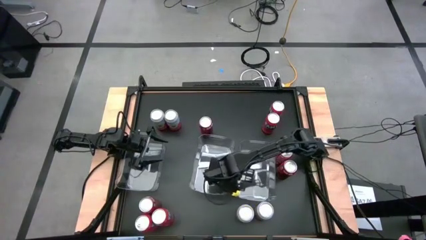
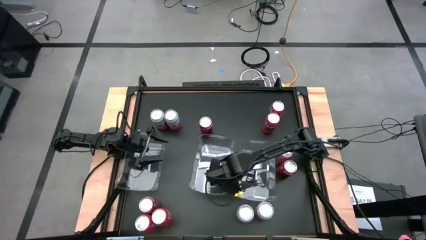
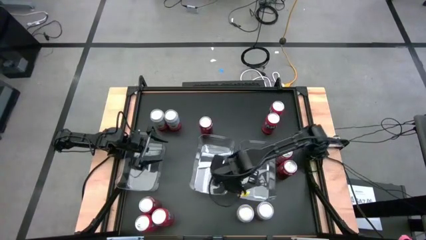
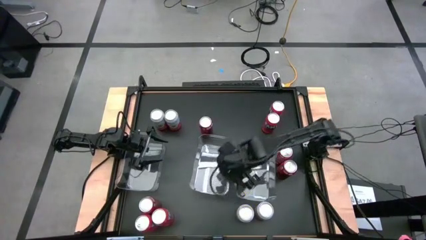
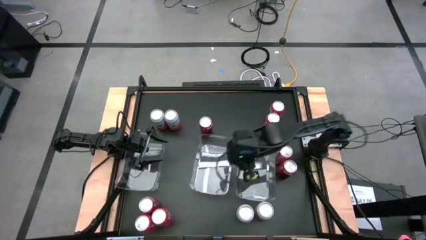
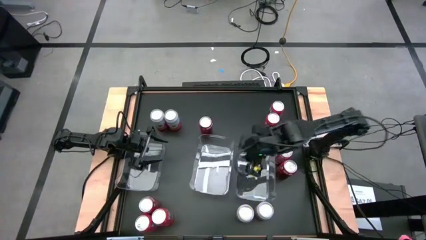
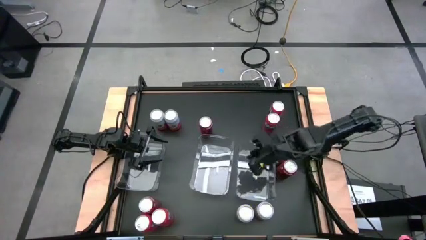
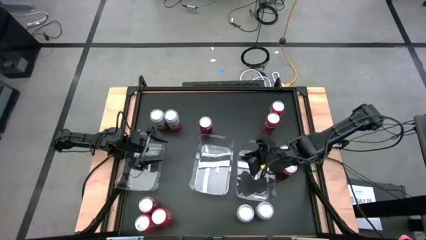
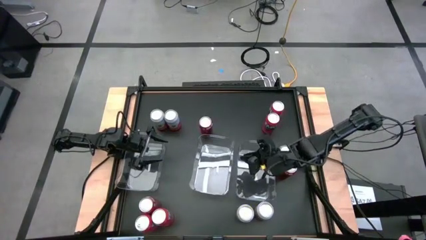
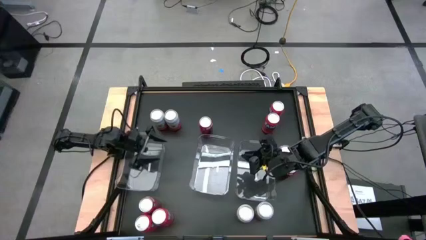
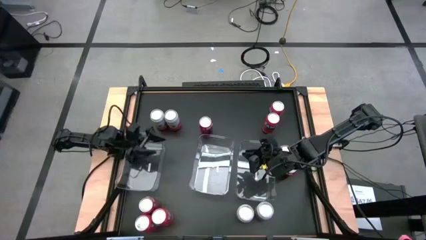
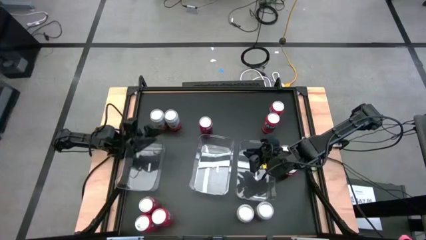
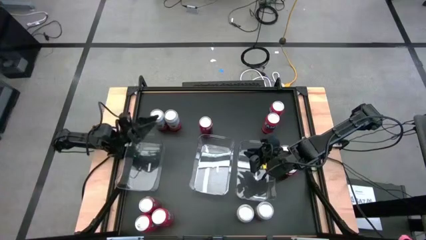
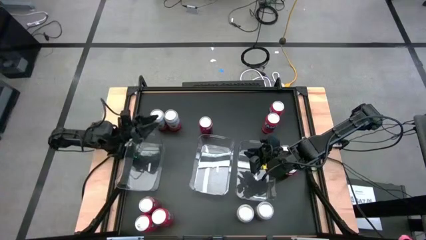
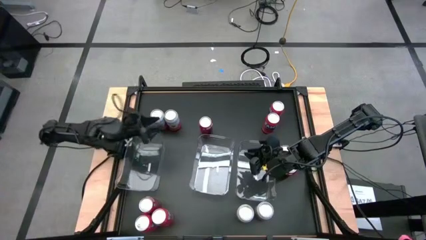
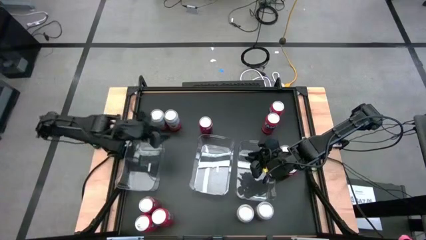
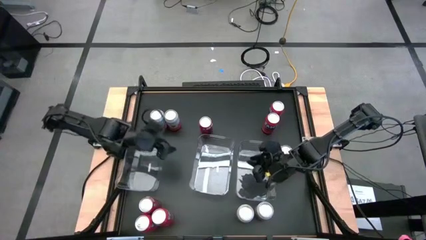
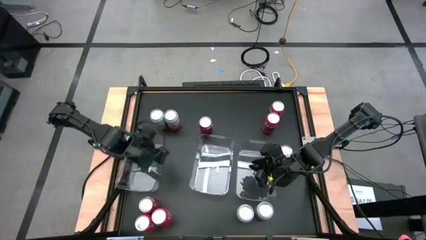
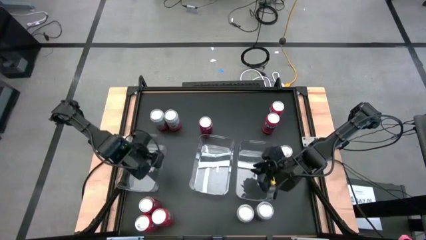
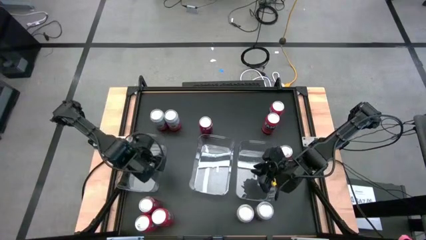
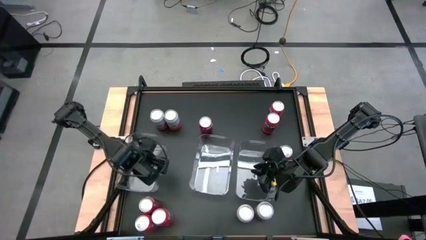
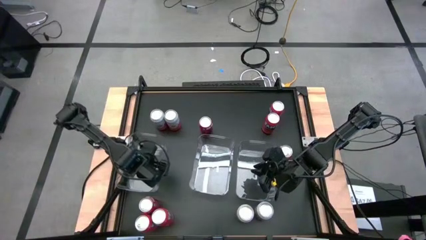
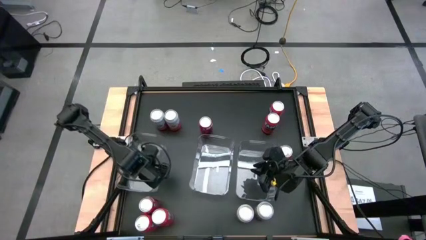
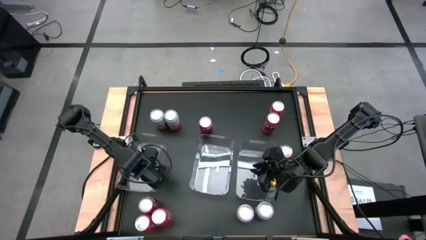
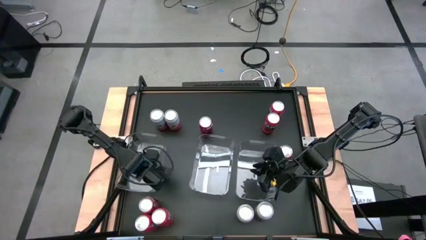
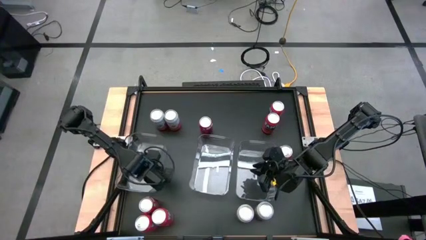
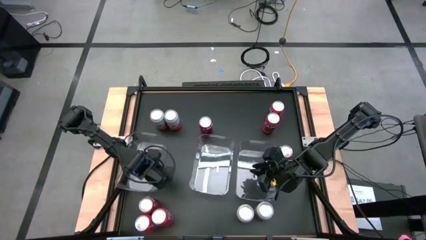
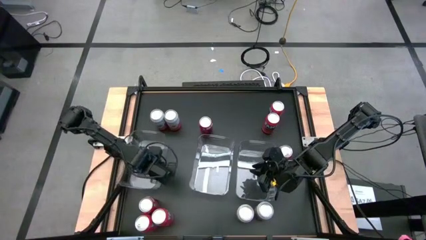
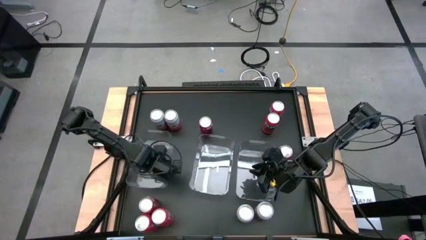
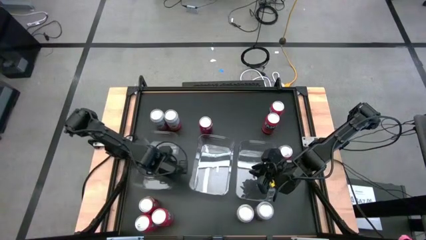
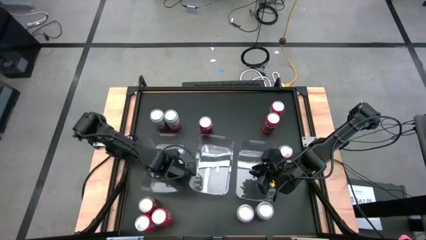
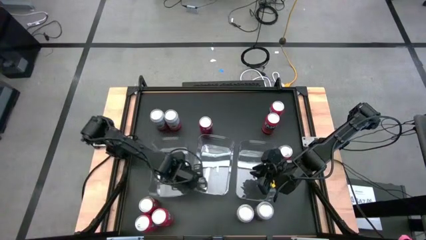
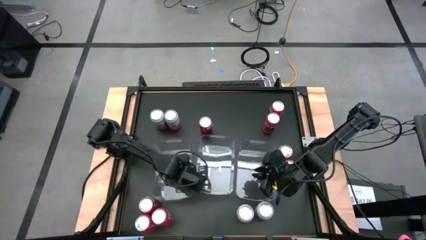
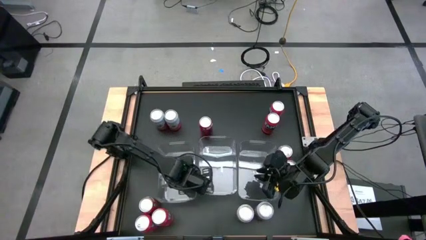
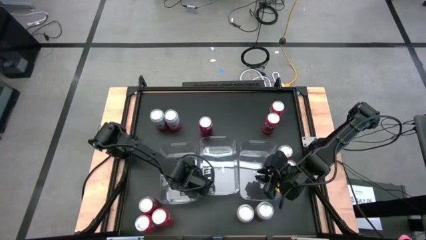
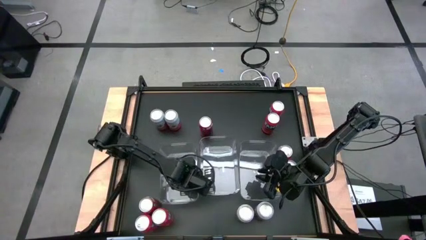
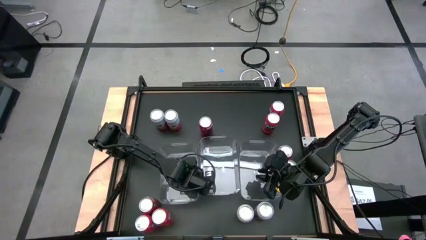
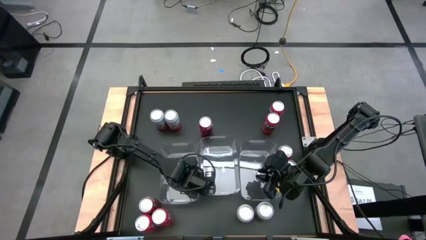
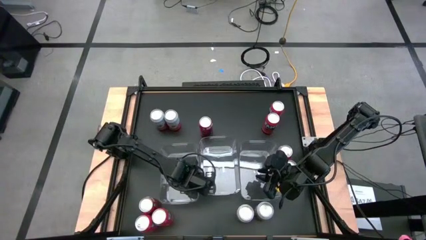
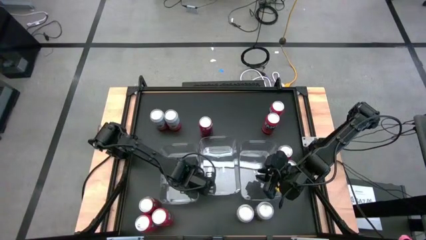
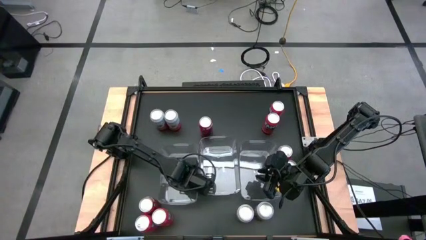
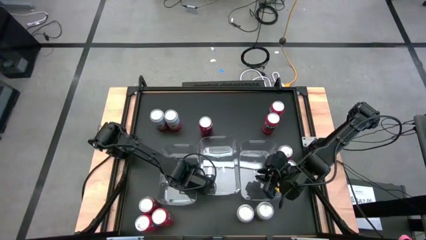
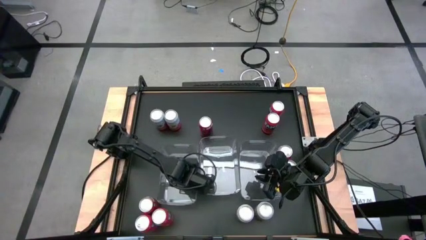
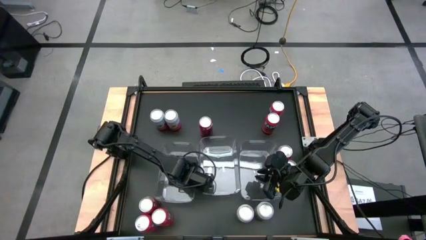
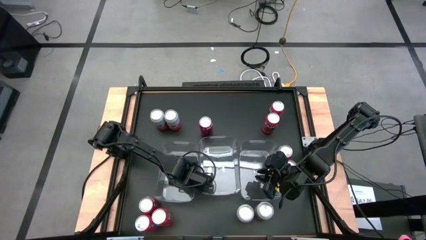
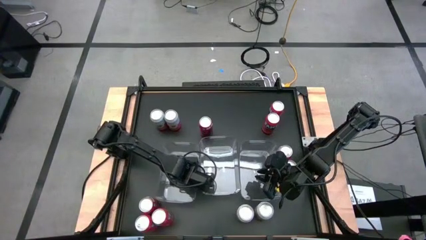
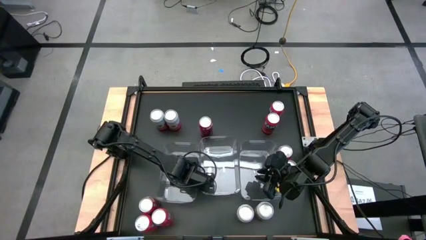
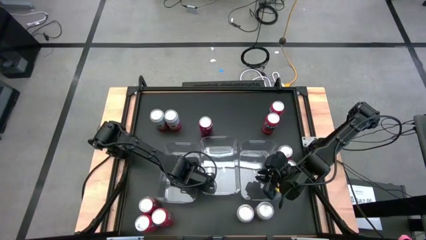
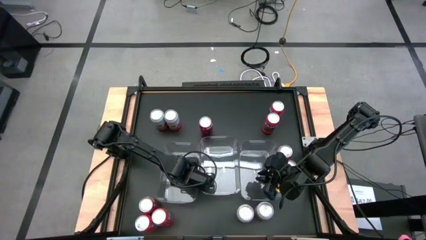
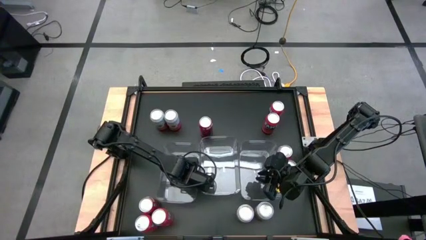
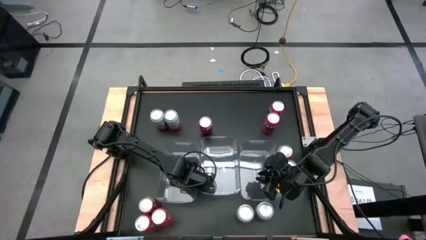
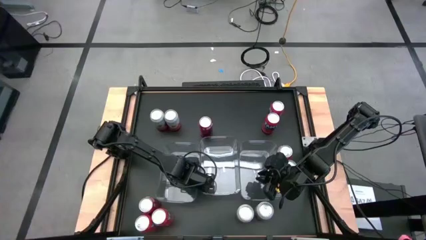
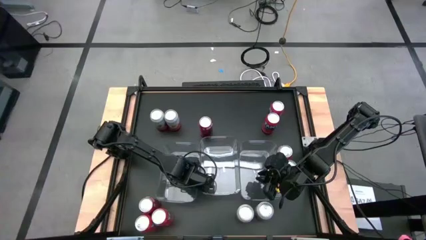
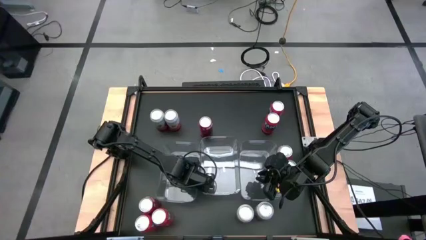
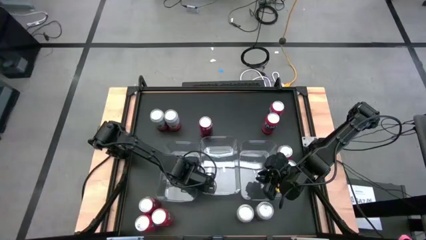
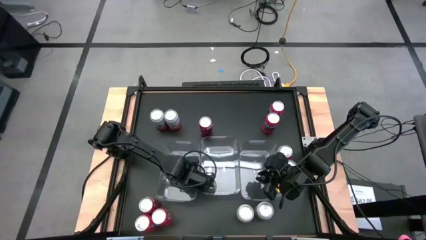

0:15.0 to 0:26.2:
Task: Sort soda cans
Adjust the left transparent bin

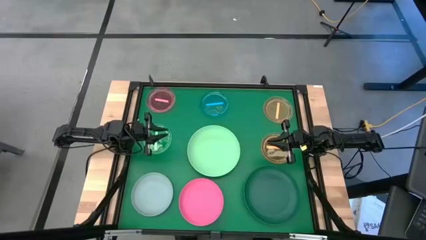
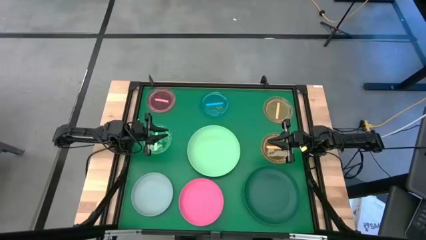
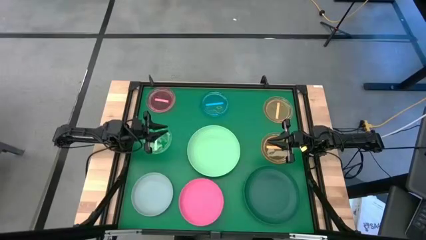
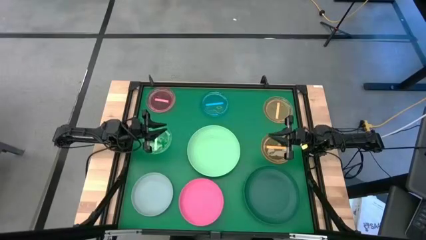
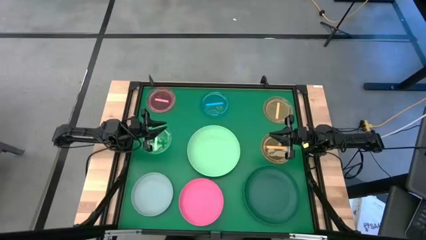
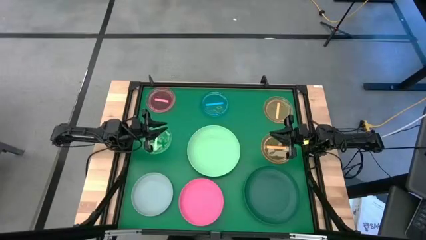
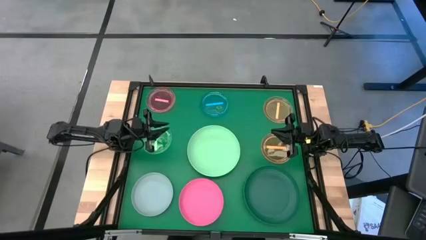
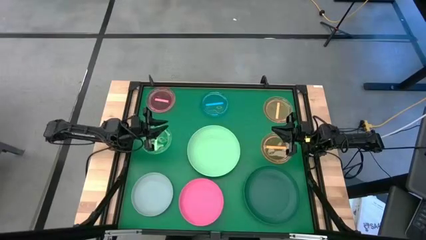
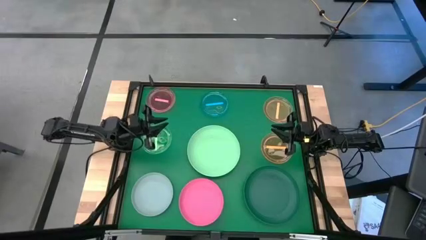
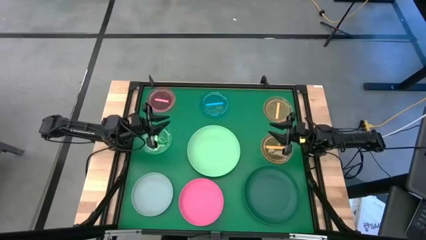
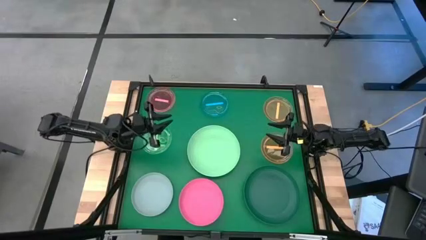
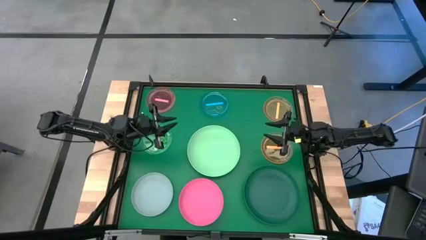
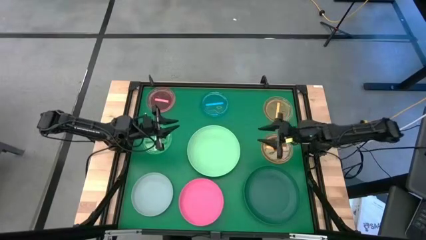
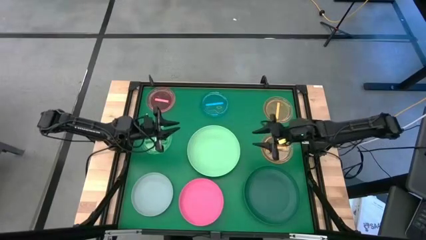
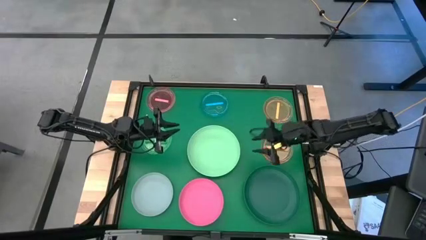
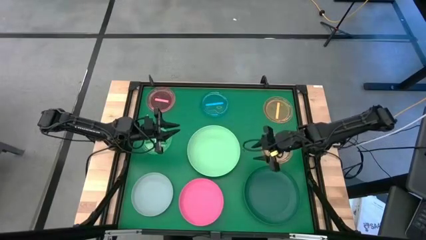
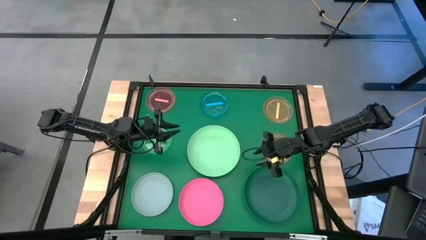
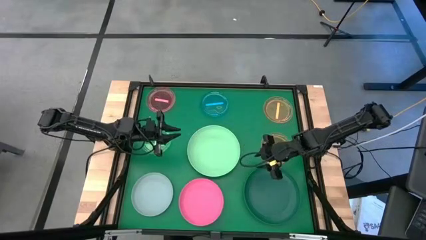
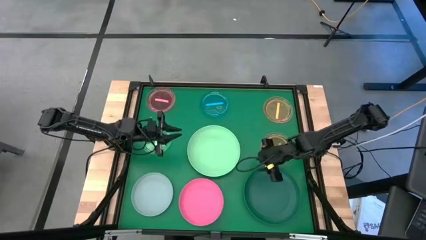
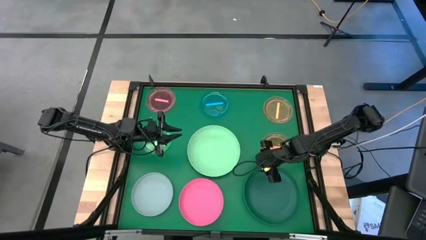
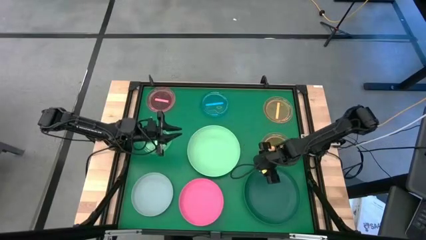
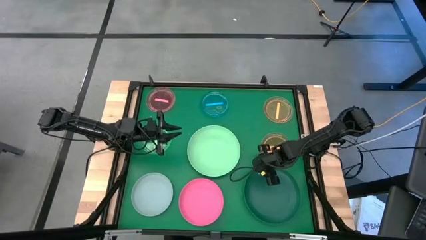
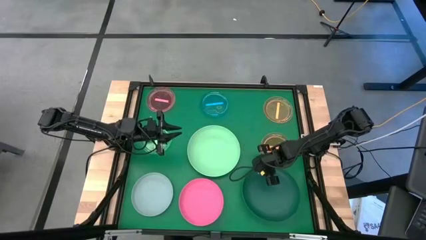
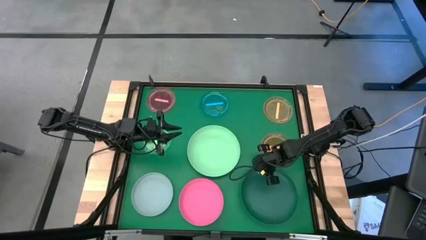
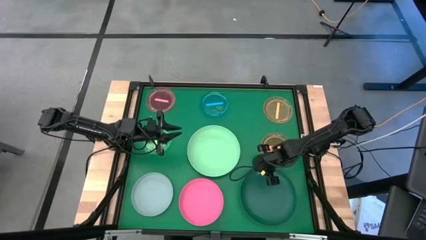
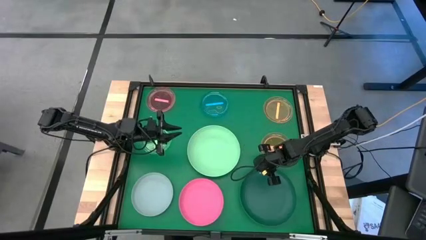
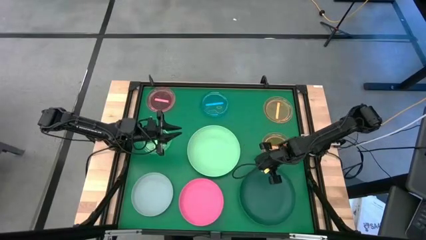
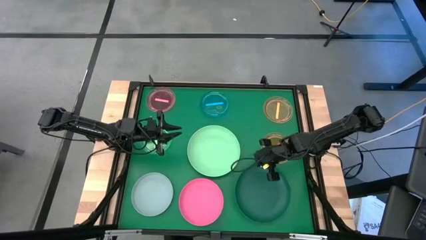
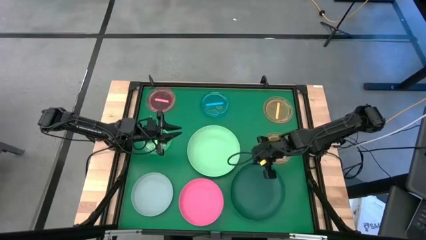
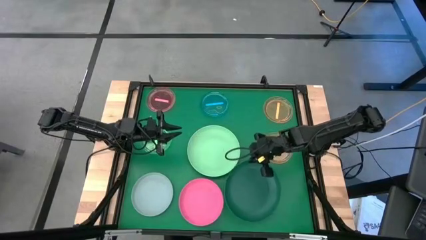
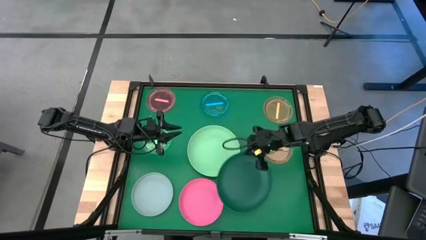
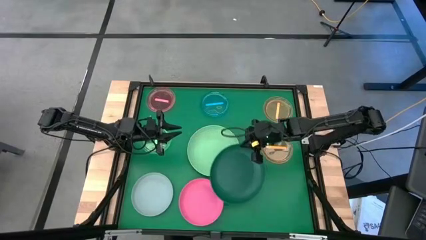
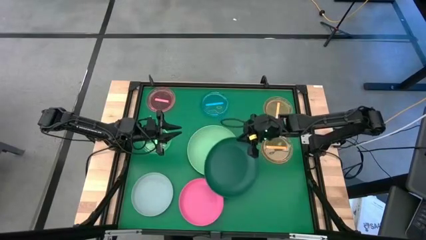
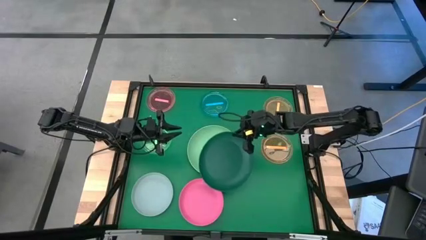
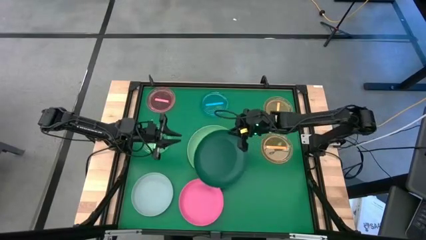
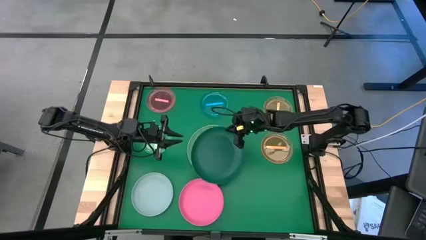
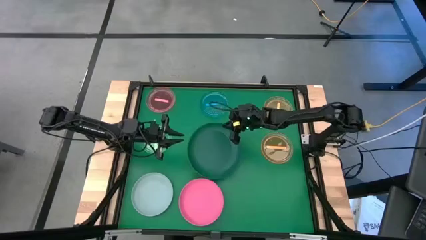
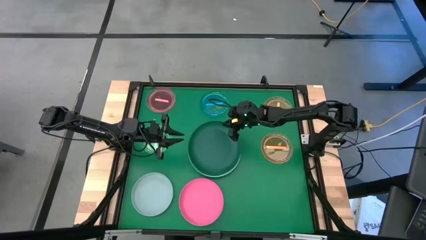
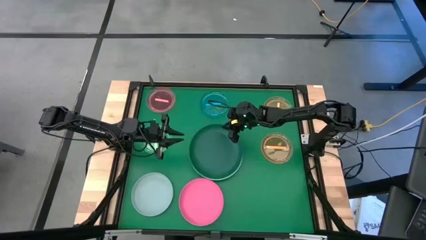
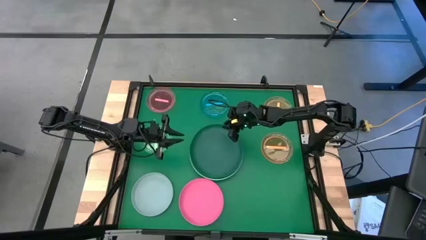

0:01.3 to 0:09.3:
Task: Stack plastic plates
Stack the dark green plate on top of the green plate
